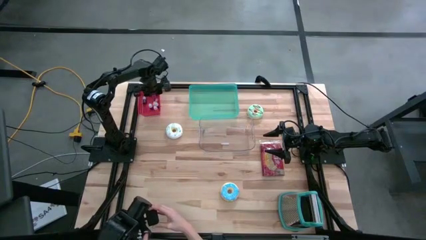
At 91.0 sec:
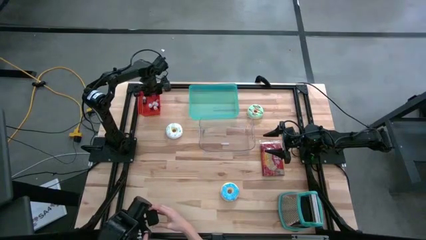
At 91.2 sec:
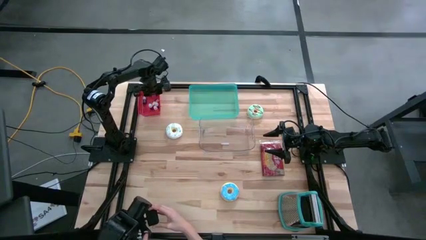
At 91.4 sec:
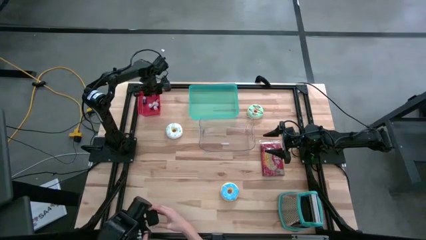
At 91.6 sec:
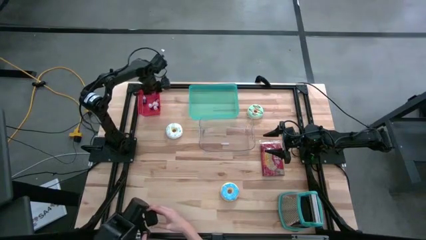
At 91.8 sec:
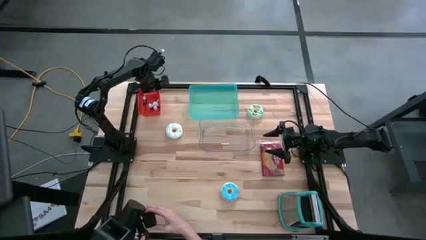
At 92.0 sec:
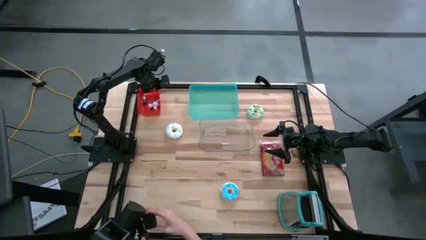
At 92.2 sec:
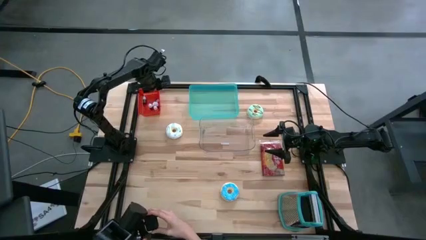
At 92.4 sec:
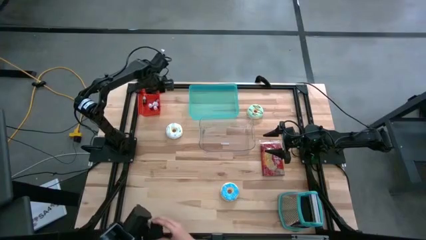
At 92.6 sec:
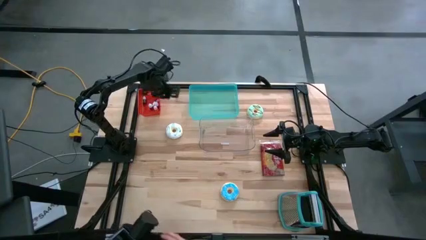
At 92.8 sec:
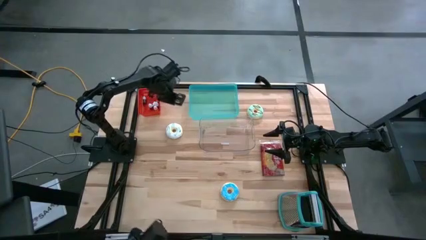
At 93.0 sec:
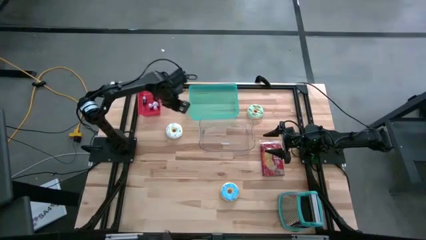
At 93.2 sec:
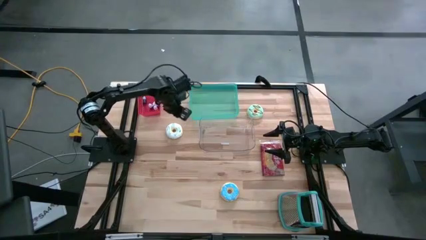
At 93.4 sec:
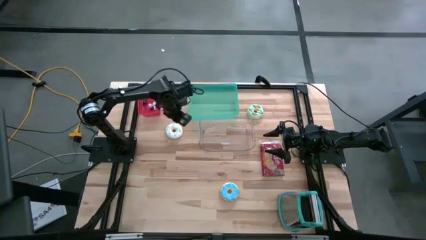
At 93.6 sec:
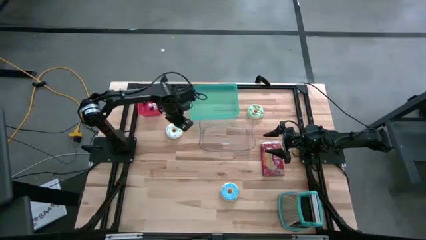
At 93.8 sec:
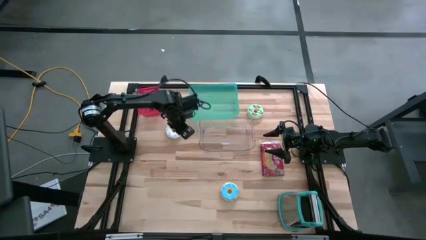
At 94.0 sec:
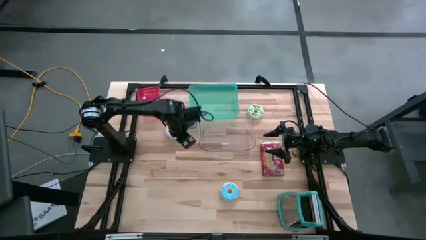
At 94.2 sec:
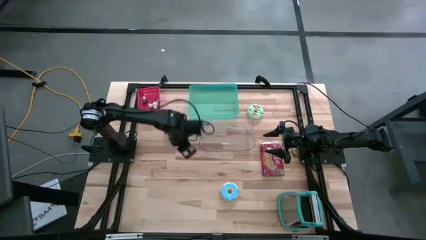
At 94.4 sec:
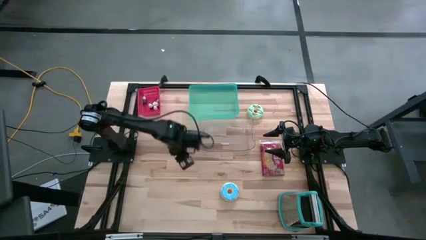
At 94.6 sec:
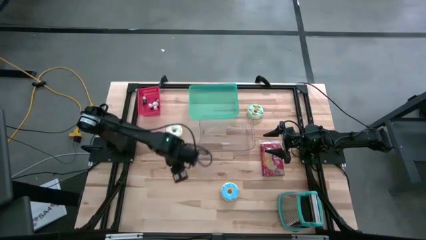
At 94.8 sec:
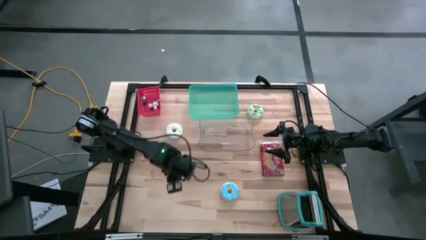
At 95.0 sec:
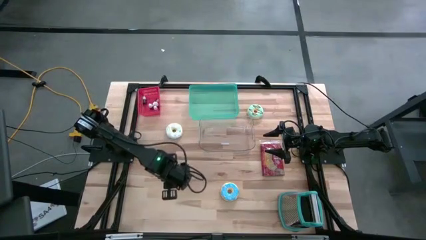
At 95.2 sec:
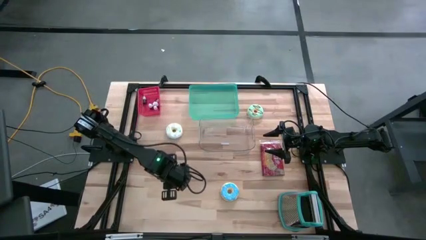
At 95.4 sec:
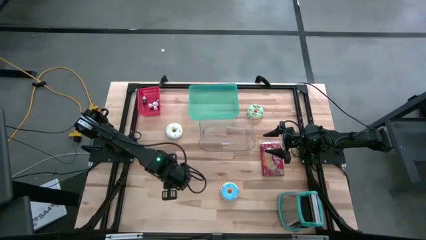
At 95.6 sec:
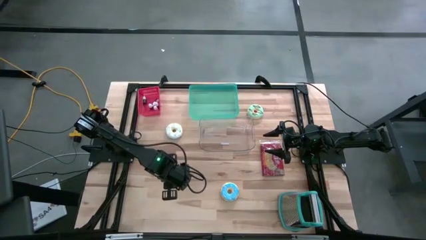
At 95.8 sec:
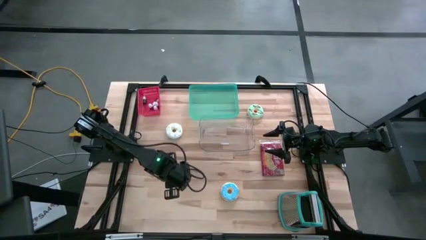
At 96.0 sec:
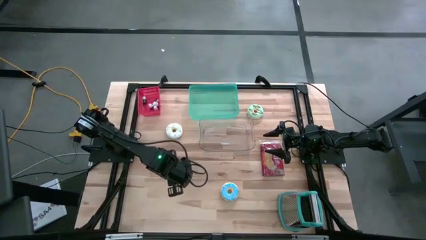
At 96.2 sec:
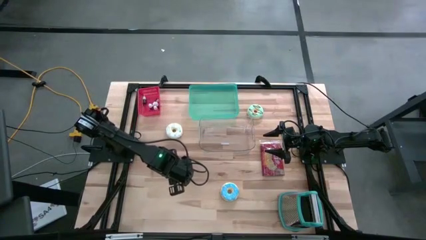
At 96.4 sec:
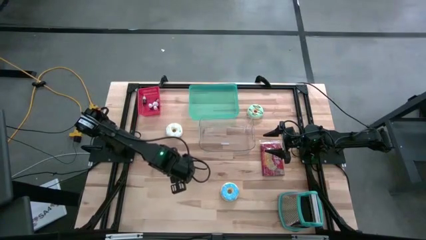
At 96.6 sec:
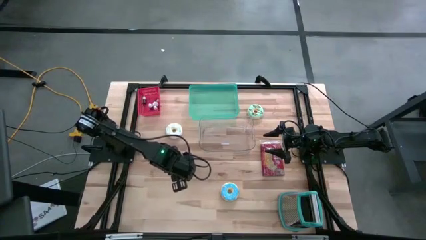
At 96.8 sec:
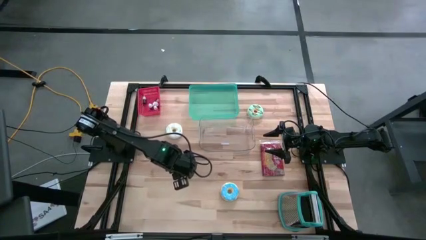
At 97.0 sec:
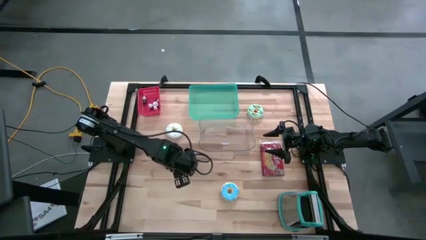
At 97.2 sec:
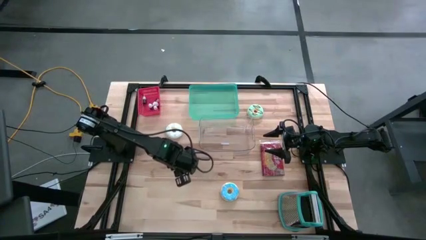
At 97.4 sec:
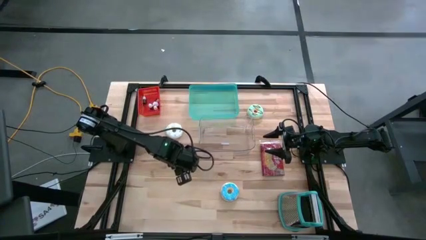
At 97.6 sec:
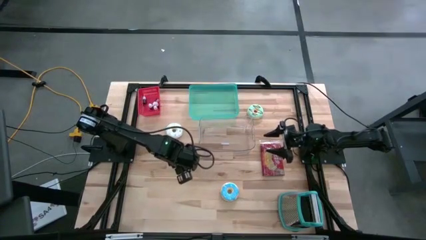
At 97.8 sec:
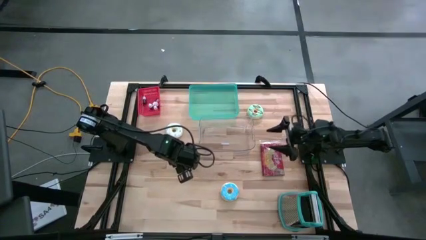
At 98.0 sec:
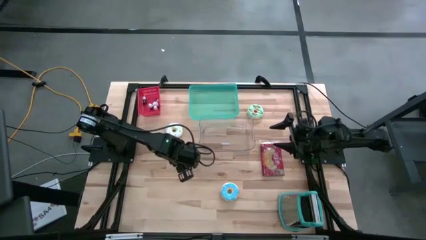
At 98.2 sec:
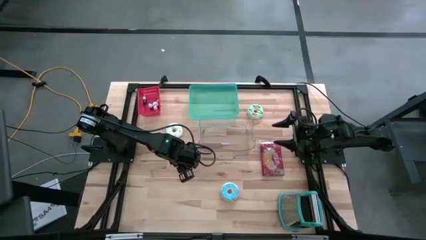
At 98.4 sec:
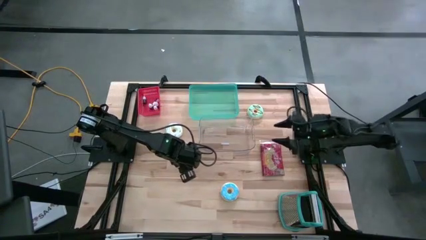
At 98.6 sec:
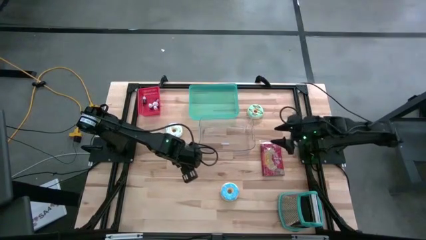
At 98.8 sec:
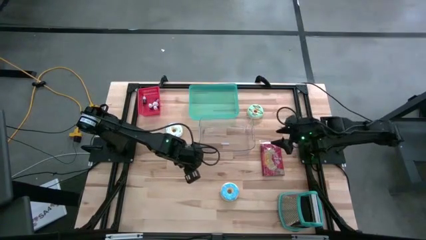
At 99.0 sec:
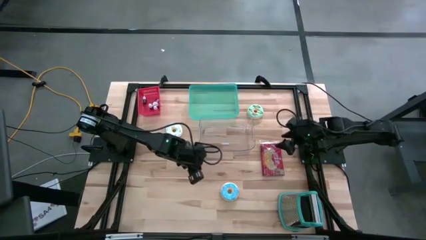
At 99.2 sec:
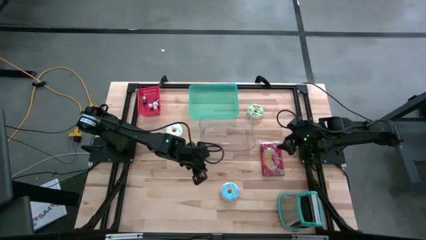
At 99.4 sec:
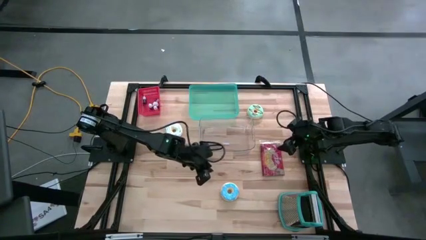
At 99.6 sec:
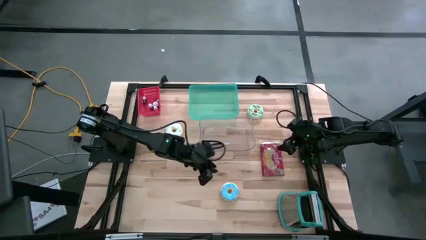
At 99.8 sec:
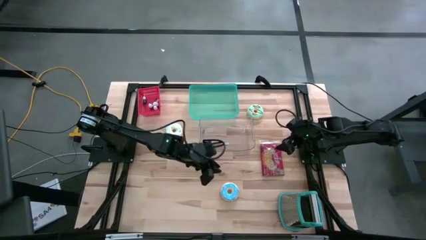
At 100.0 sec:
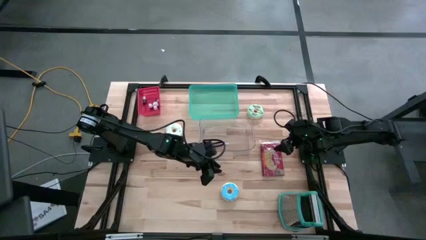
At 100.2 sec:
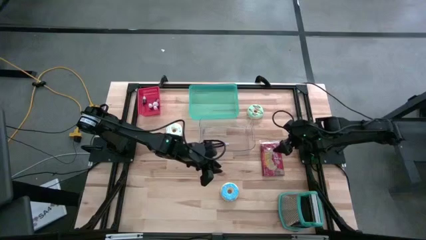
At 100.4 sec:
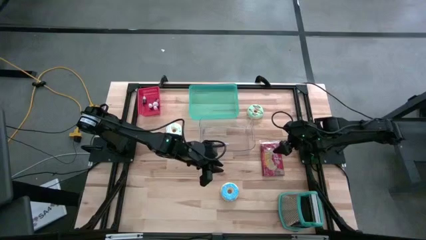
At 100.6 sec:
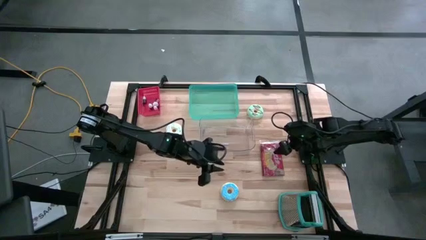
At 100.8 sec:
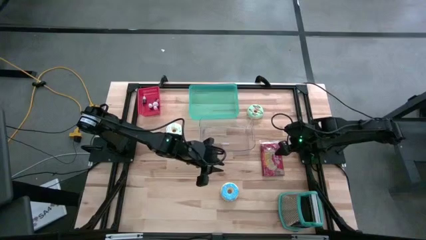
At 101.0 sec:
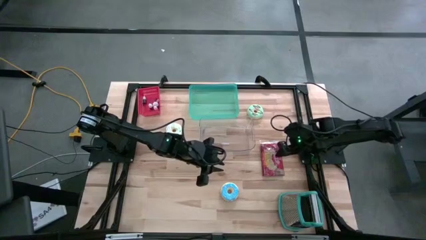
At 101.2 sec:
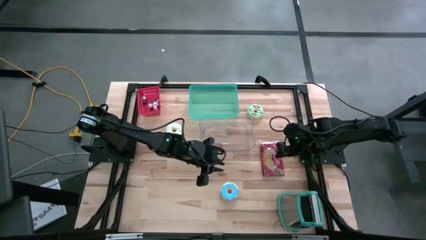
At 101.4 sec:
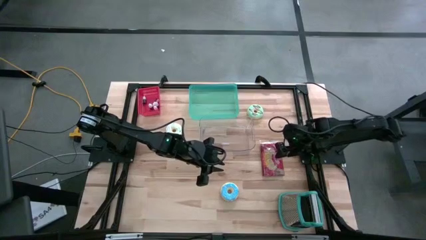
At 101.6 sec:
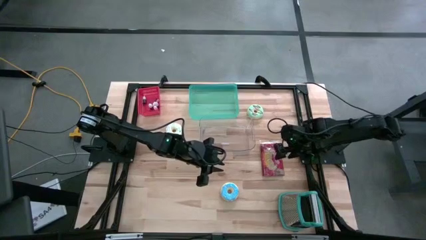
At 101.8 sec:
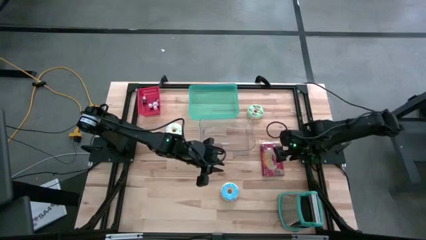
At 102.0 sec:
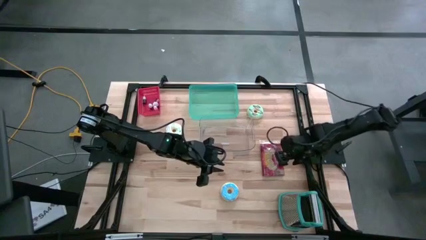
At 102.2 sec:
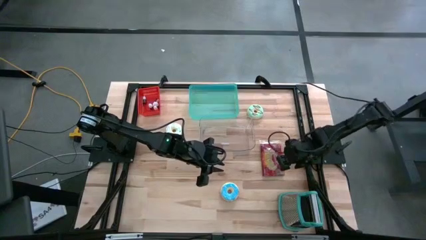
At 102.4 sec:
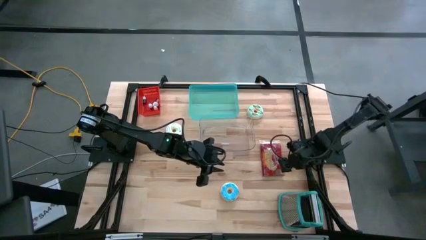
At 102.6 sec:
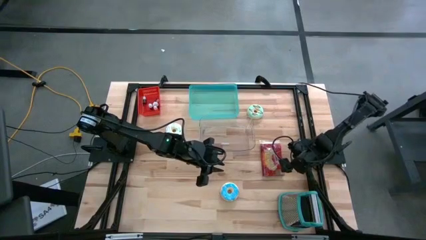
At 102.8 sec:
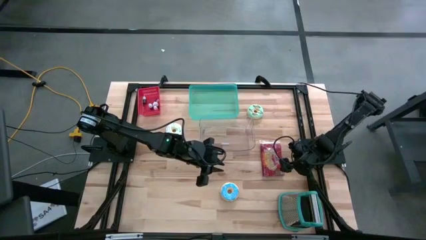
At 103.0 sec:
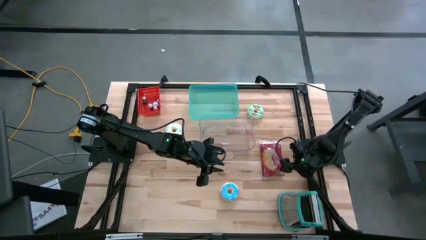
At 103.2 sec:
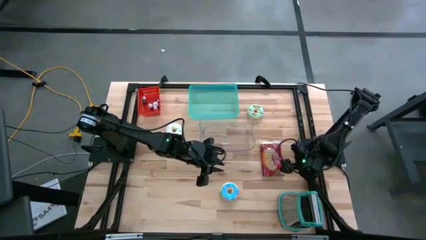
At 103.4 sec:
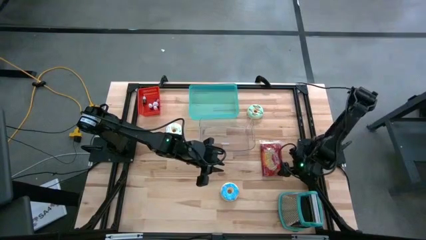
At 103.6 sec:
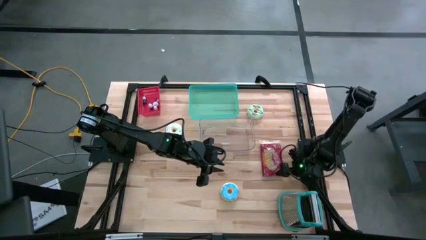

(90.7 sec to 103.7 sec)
Put the popcorn bag into the blue bin
